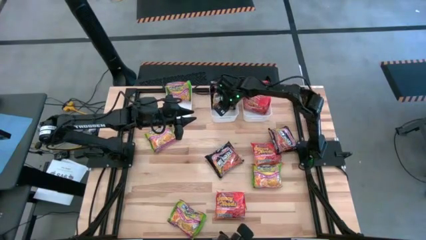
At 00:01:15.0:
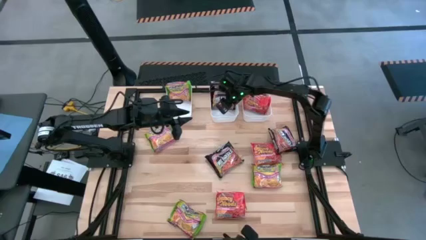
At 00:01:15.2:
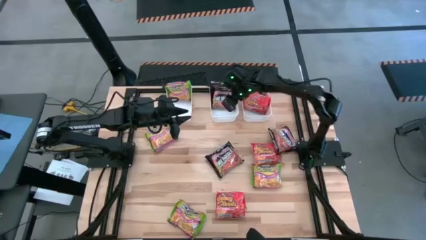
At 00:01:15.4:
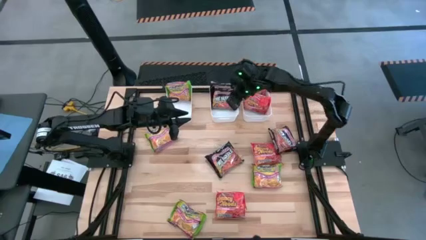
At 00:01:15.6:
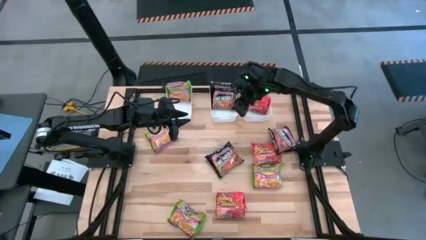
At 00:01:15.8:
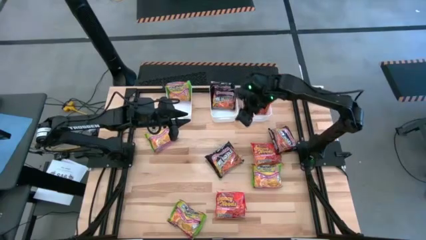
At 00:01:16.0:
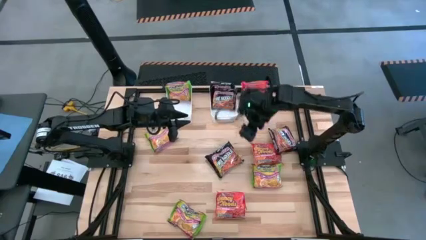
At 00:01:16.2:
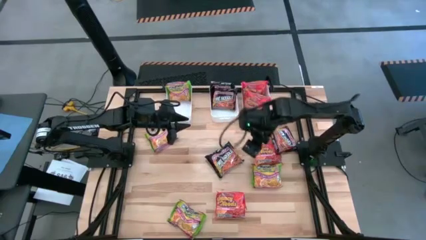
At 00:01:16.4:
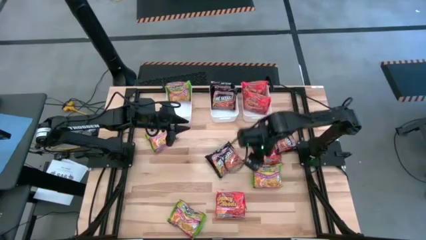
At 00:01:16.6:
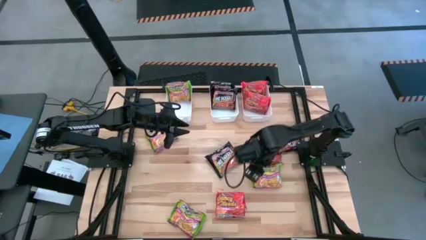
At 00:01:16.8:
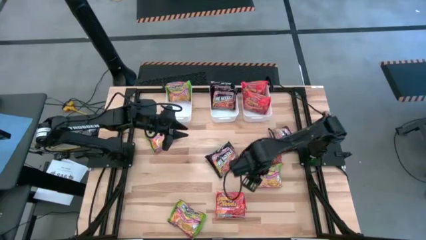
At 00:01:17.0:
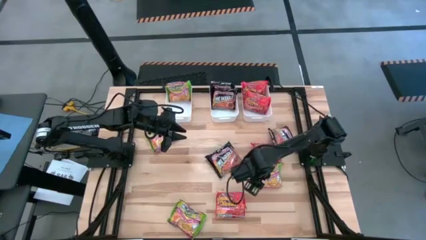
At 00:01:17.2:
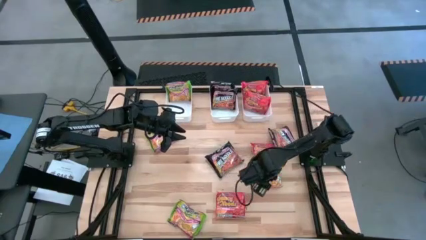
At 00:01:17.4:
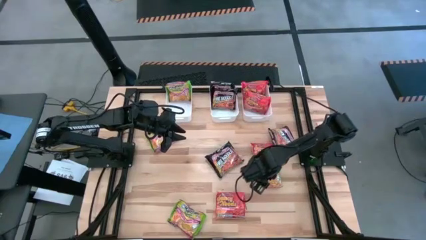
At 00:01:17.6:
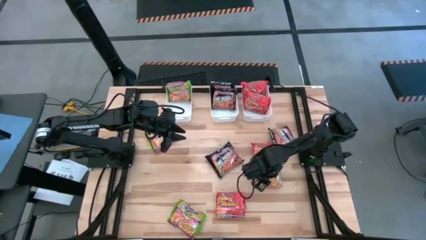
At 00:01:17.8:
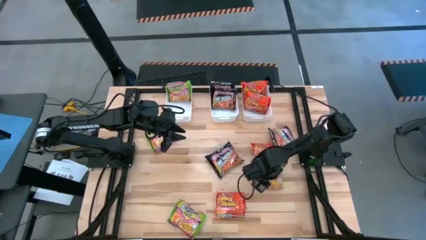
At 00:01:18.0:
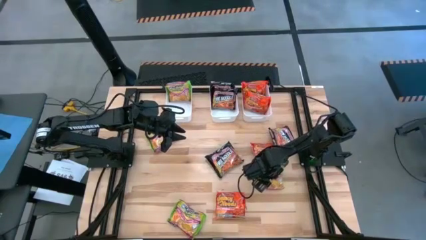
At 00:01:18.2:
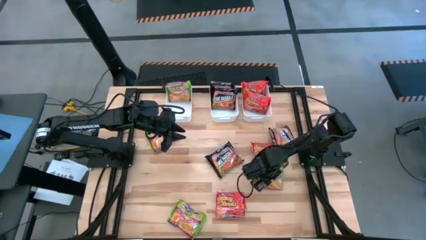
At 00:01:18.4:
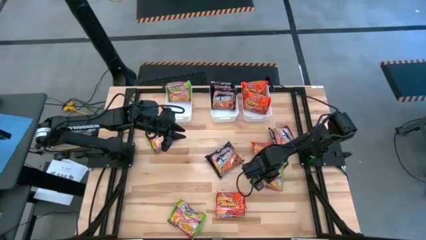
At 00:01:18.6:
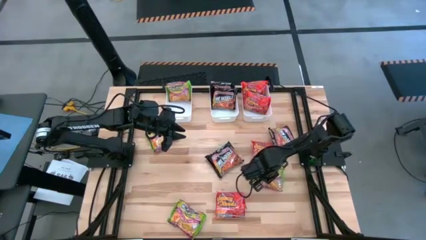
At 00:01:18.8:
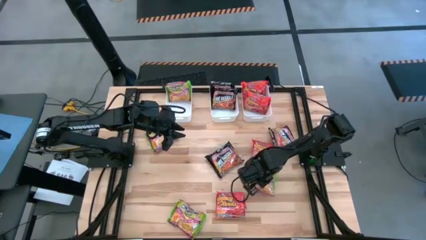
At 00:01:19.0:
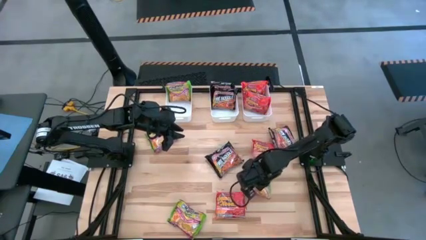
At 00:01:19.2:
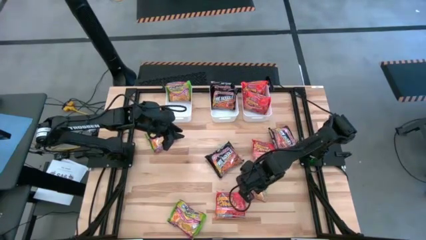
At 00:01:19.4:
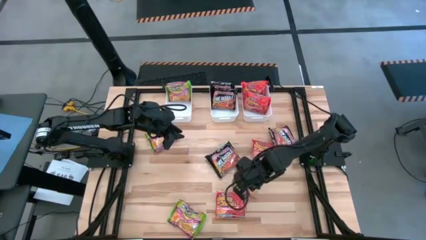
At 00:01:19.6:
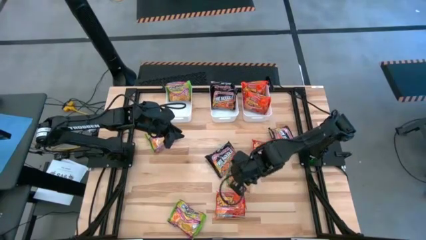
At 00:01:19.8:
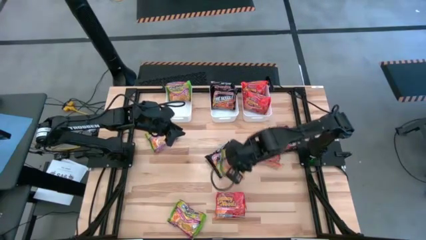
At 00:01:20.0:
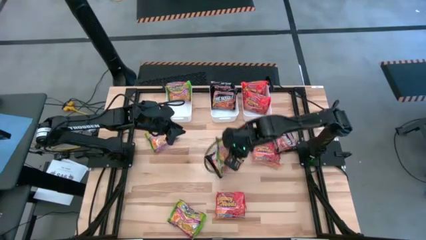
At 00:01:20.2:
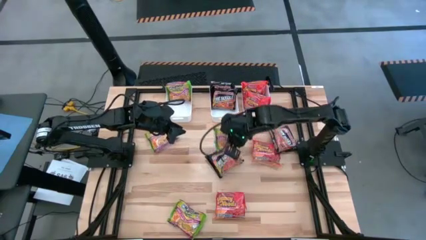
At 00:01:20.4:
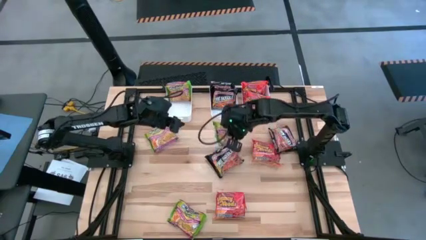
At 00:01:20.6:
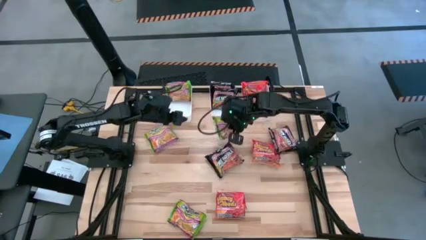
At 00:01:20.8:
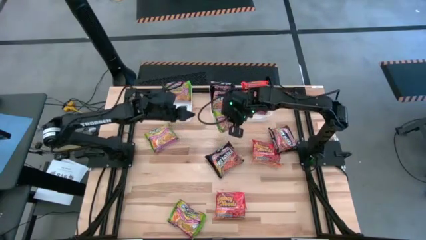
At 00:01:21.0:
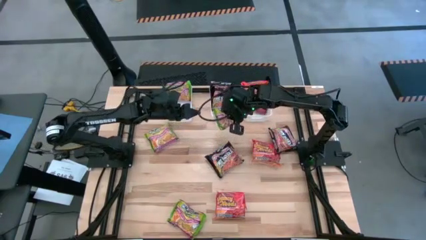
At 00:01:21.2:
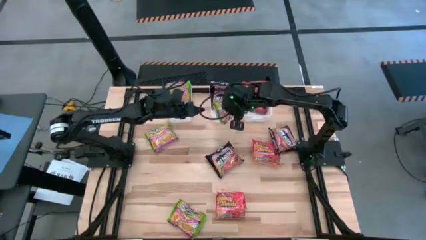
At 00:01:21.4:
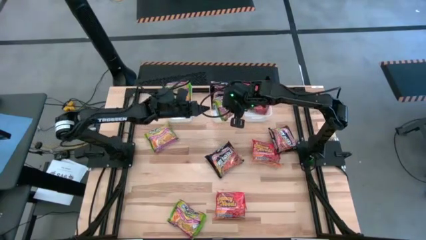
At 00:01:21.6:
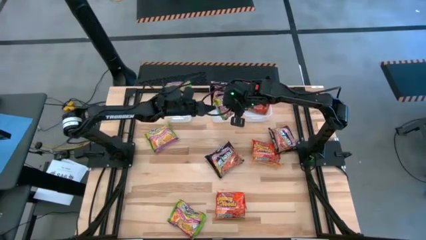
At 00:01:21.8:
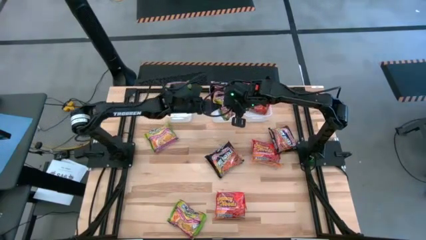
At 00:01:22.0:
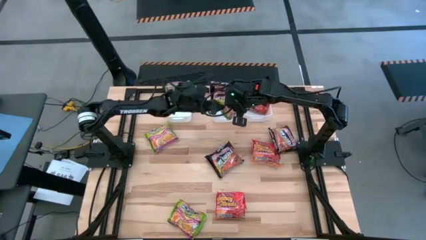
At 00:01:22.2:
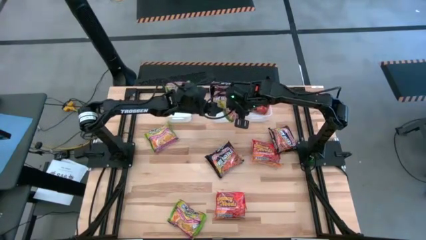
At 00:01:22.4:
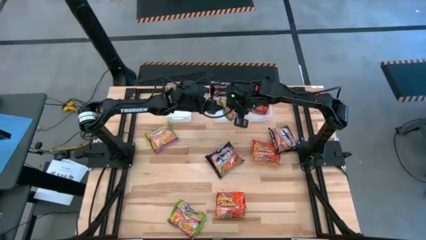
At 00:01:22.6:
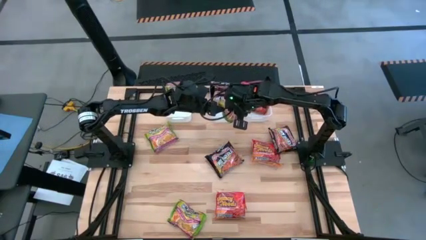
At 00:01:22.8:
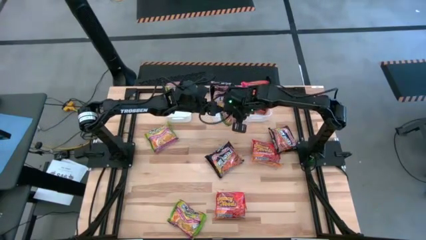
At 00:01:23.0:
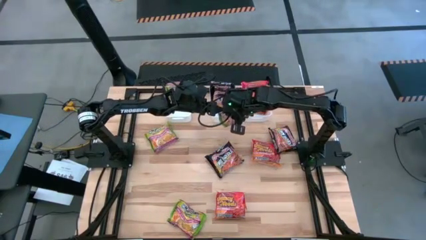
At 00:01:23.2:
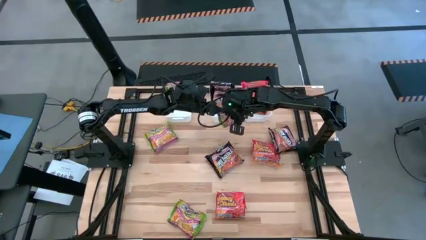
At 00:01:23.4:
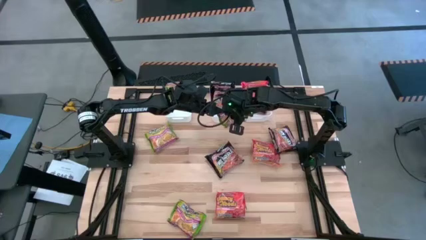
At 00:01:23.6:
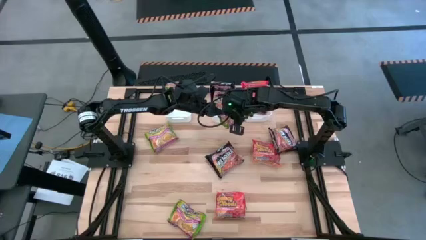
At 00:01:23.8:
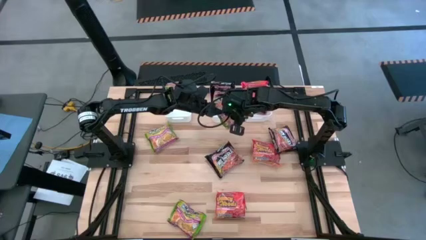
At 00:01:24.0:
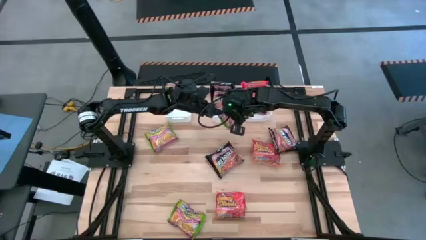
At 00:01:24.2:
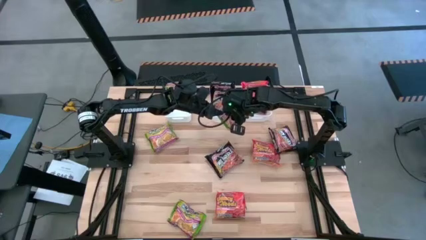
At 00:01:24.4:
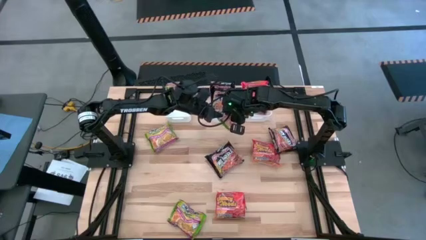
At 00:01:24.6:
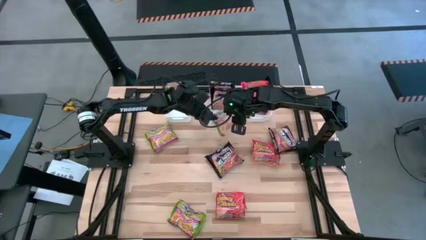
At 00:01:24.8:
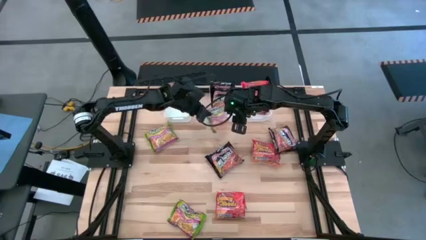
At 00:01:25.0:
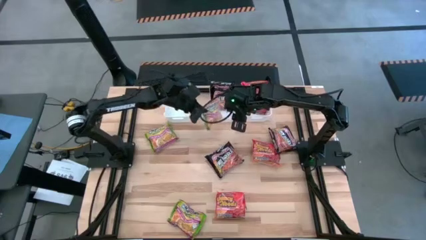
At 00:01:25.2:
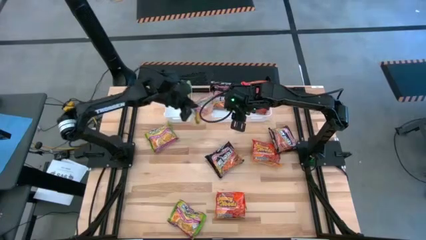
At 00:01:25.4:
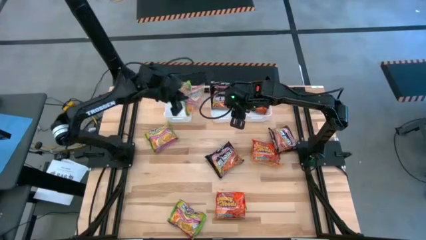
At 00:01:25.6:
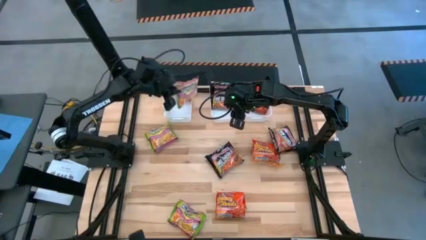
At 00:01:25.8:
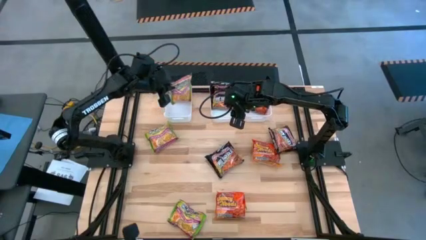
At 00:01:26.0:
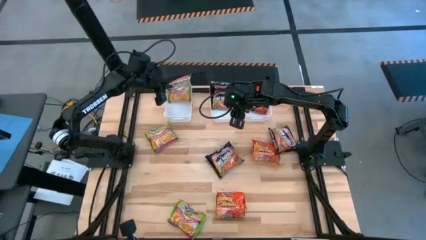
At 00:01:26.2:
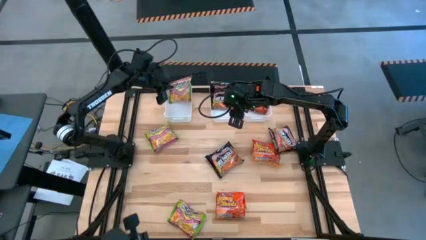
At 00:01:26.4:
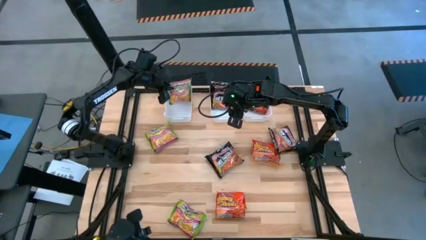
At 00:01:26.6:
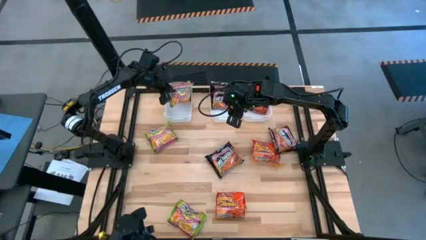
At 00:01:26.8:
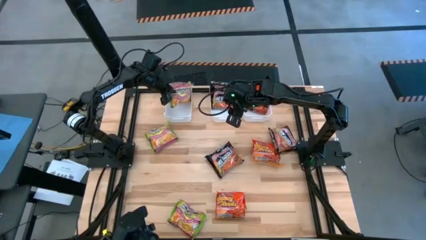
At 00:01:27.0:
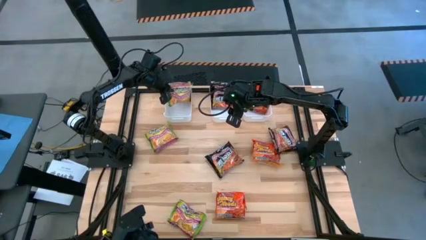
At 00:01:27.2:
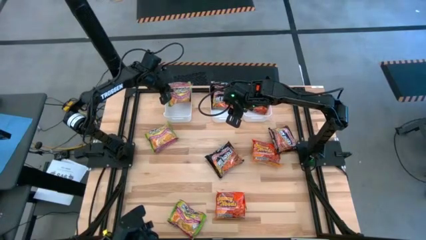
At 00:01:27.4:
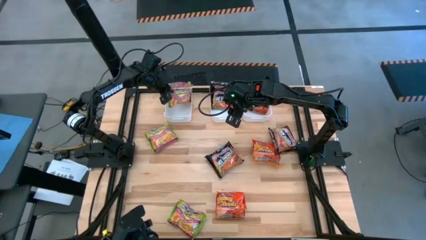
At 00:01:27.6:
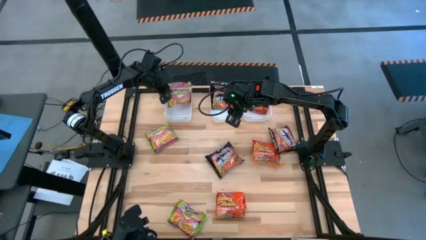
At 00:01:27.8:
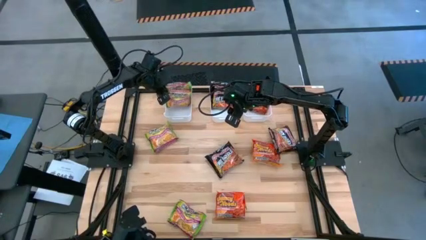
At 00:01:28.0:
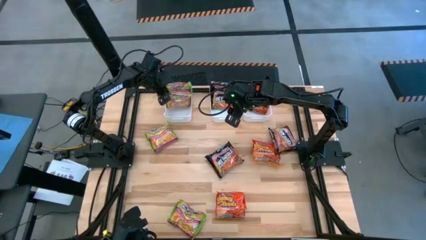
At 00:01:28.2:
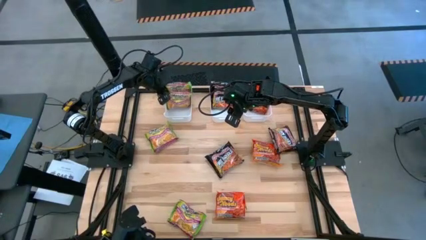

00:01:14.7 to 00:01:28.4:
Task: Sort Maruchan noodles
Put the green noodle pack into the left white bin

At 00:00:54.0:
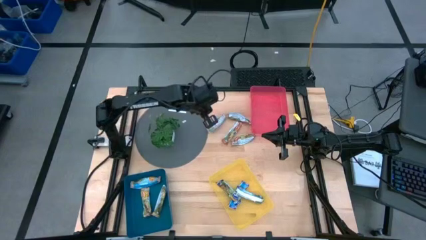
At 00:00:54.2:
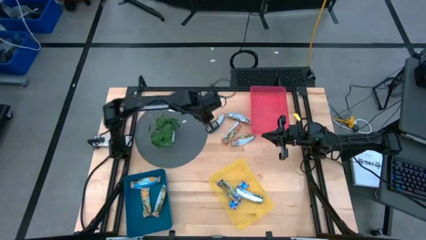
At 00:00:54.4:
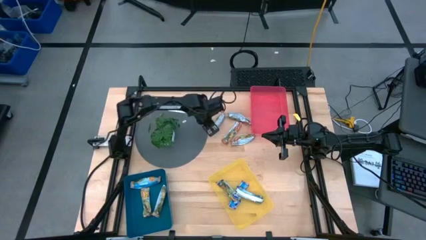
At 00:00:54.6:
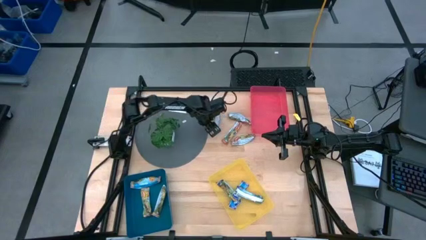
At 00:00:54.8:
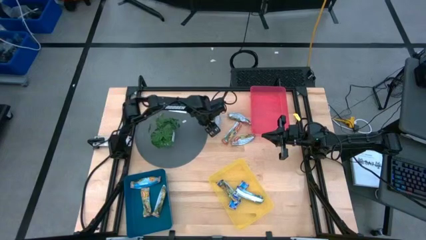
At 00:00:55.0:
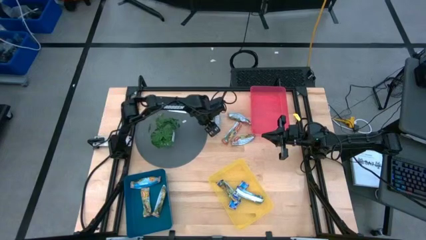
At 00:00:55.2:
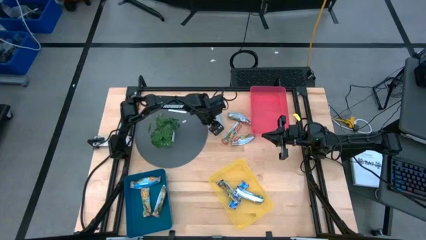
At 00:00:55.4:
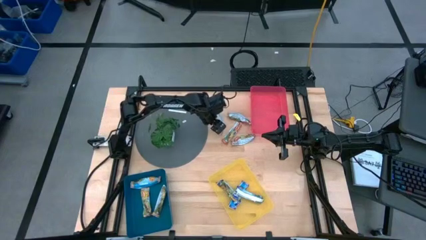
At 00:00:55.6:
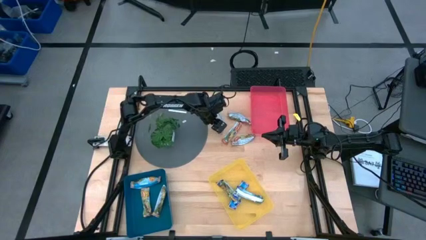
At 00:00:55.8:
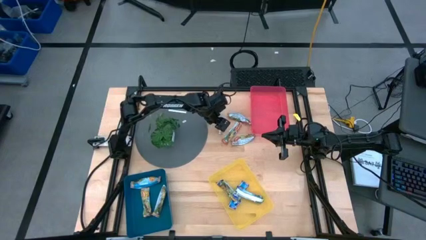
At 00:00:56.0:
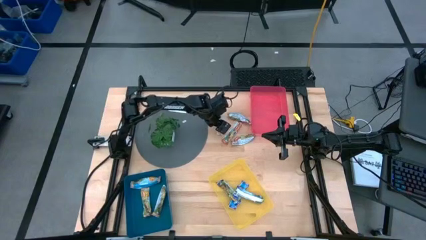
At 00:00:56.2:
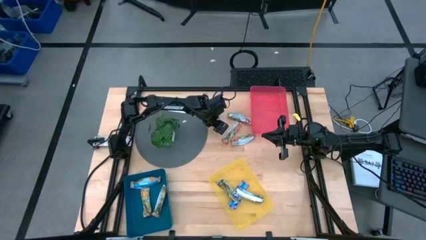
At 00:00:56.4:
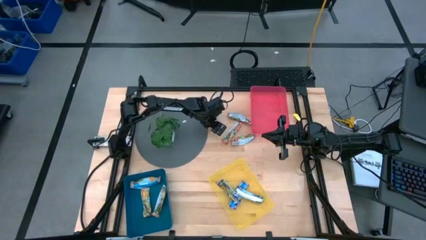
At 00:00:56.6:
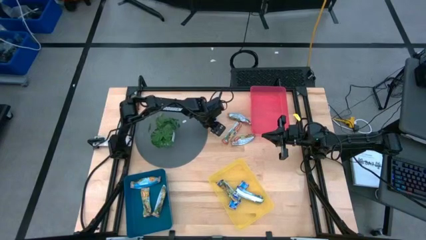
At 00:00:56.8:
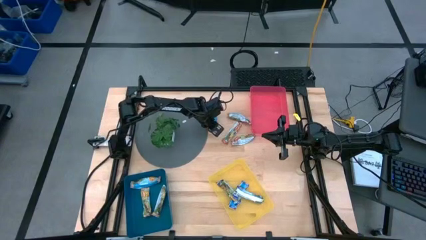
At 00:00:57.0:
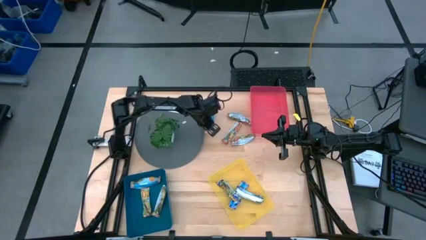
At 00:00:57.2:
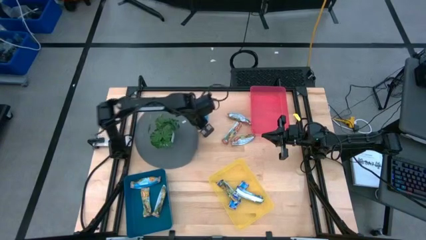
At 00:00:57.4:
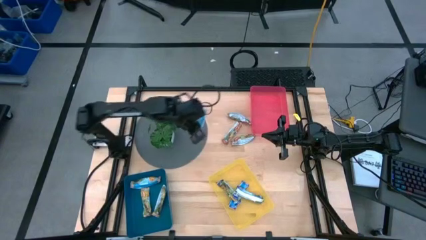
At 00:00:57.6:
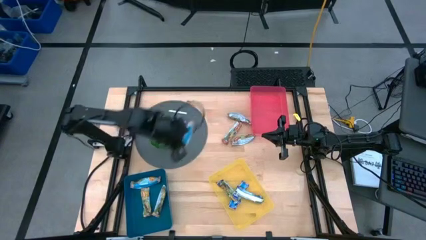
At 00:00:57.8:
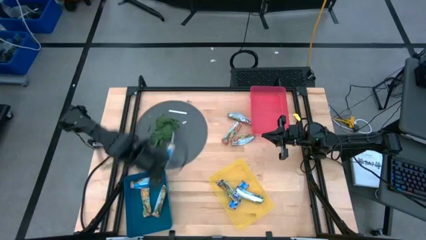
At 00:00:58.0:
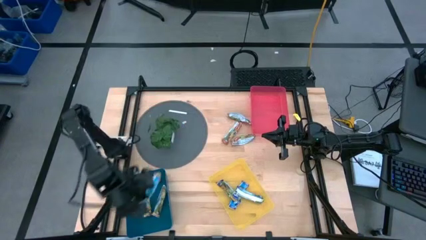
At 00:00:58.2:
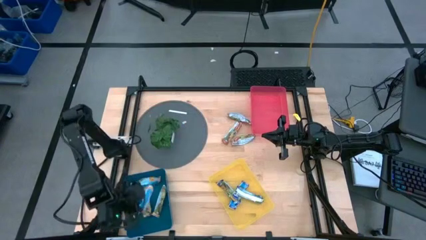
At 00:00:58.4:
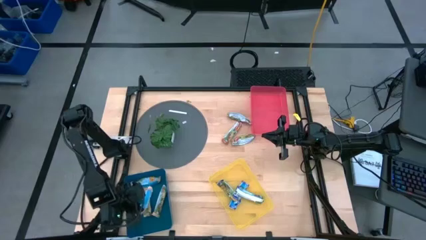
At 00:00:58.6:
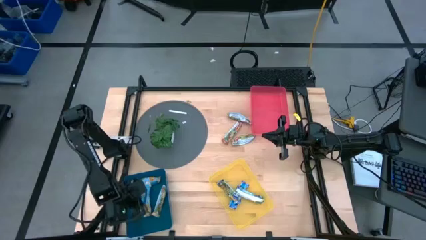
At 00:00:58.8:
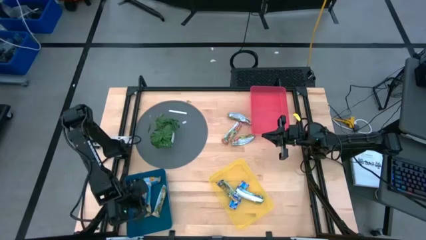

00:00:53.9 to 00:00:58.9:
Task: Pick and place Granola Bars by type
Put the yellow snack into the blue bin
